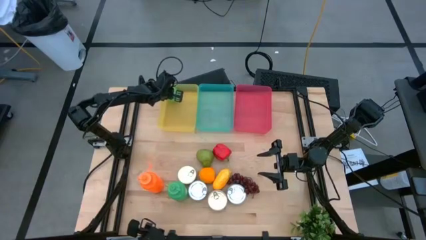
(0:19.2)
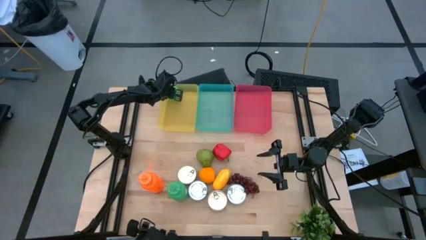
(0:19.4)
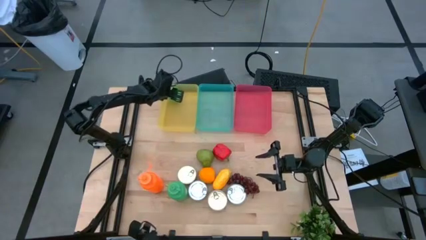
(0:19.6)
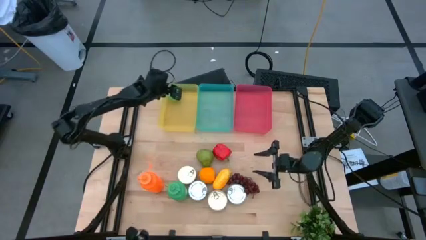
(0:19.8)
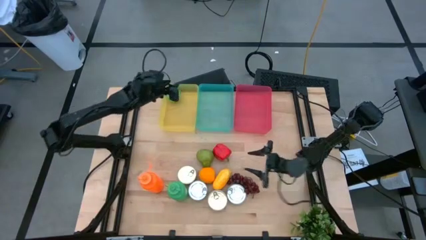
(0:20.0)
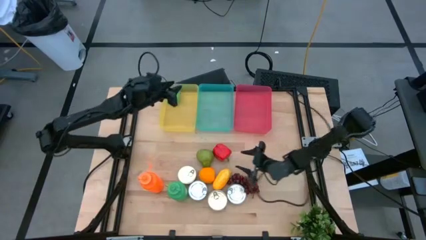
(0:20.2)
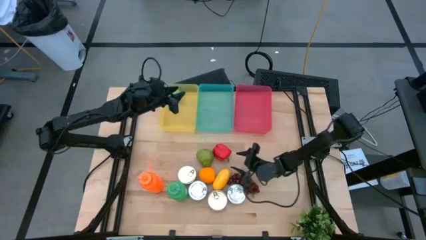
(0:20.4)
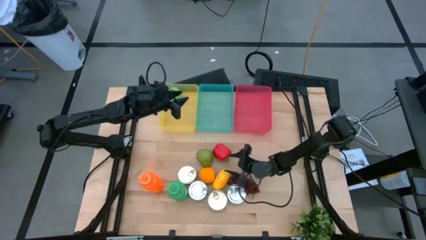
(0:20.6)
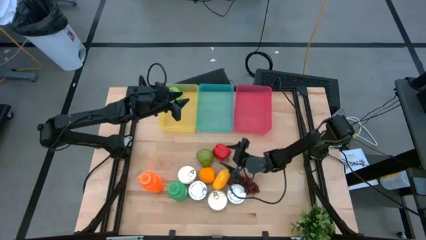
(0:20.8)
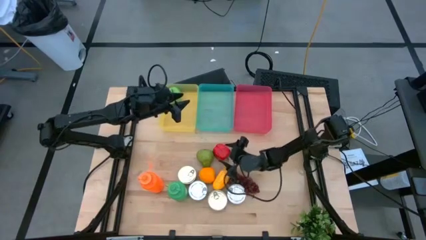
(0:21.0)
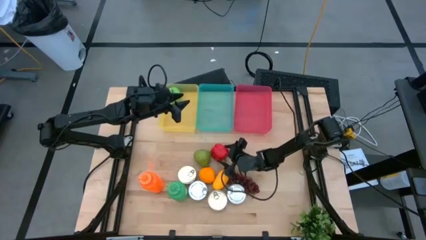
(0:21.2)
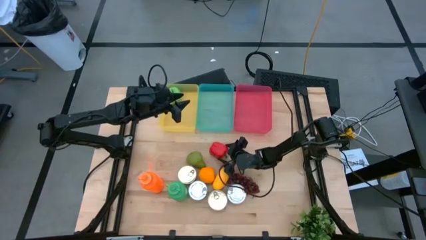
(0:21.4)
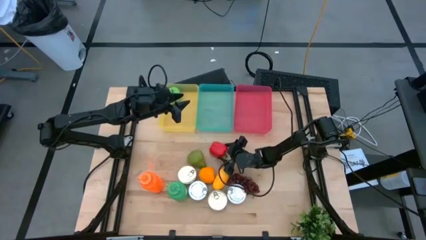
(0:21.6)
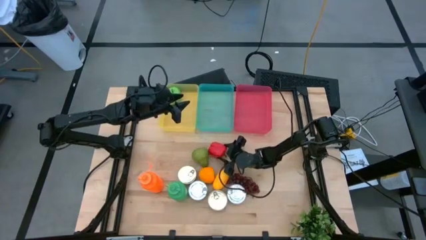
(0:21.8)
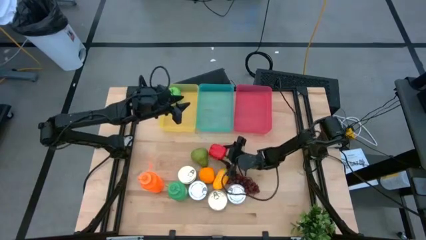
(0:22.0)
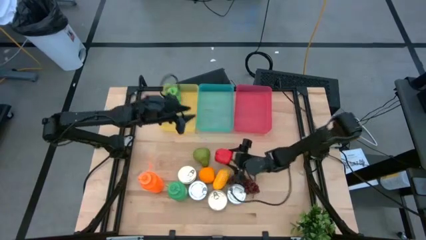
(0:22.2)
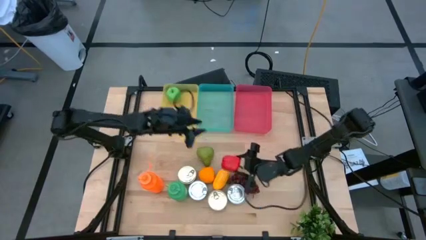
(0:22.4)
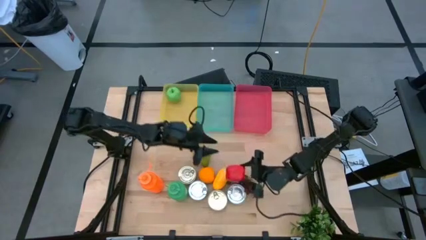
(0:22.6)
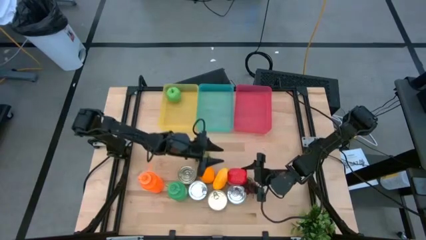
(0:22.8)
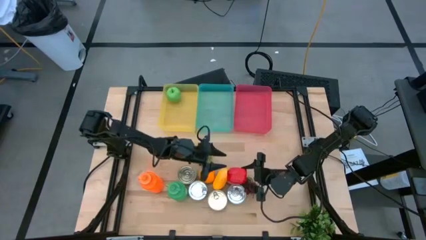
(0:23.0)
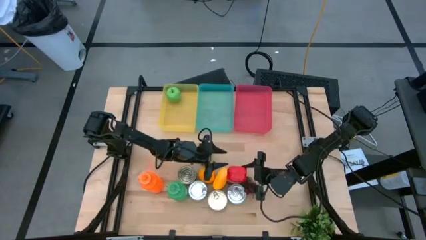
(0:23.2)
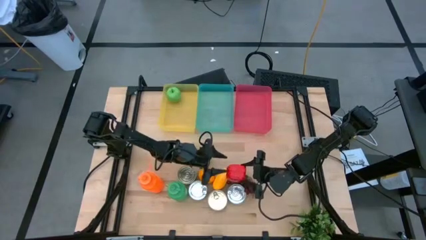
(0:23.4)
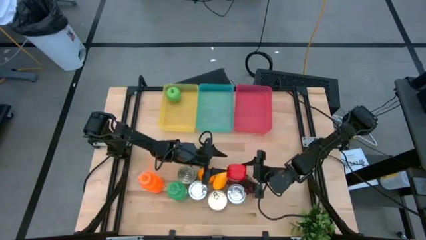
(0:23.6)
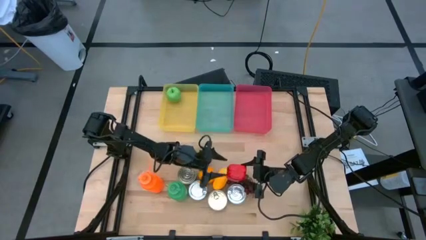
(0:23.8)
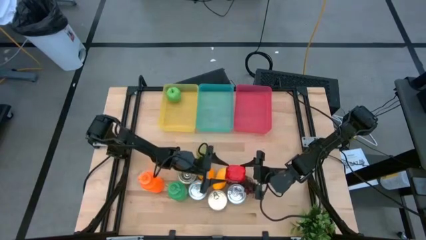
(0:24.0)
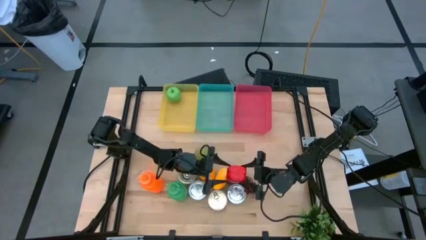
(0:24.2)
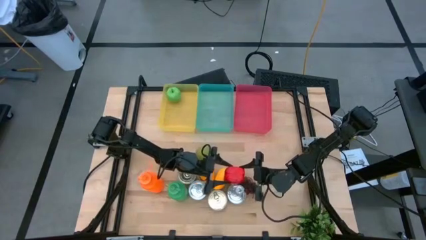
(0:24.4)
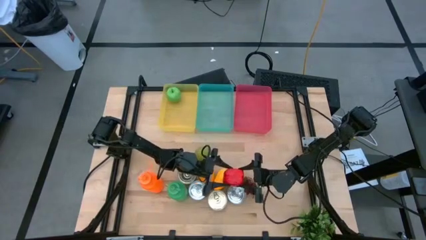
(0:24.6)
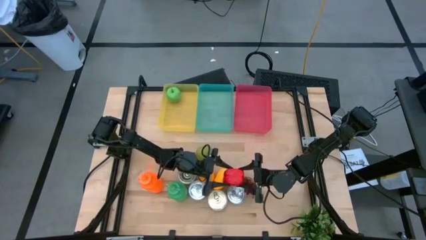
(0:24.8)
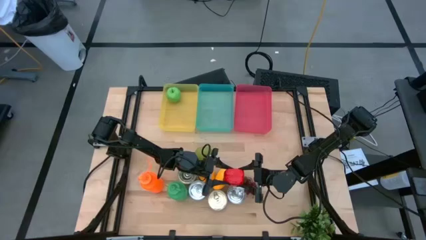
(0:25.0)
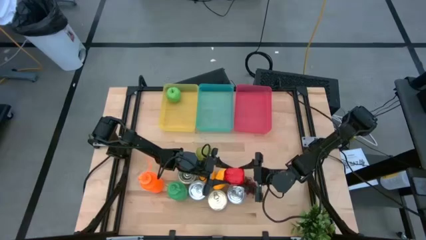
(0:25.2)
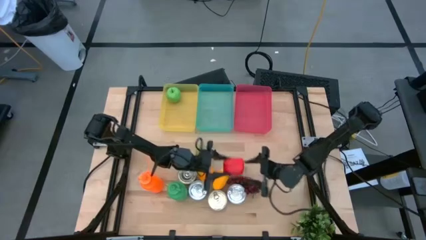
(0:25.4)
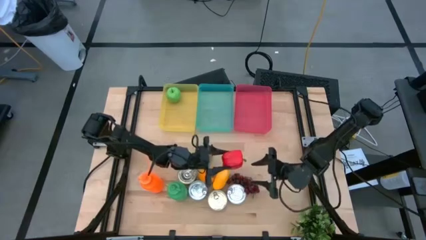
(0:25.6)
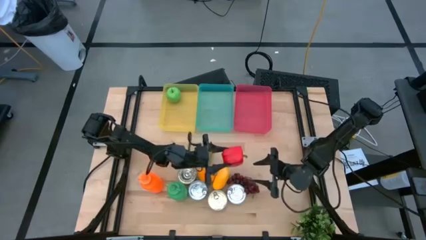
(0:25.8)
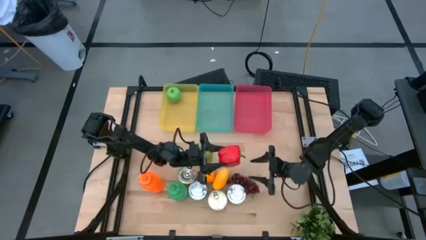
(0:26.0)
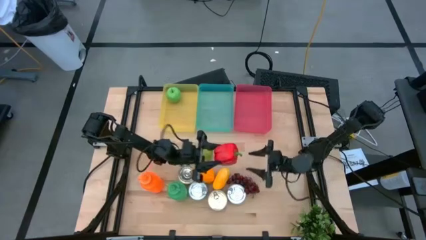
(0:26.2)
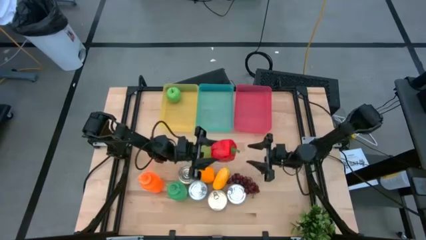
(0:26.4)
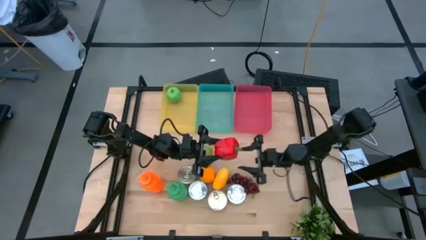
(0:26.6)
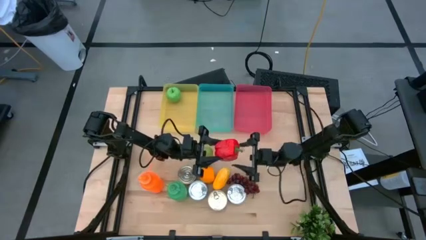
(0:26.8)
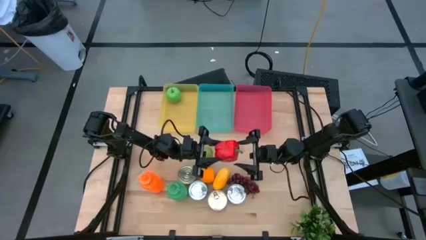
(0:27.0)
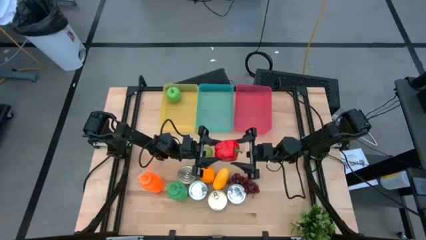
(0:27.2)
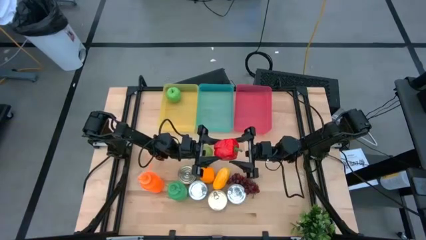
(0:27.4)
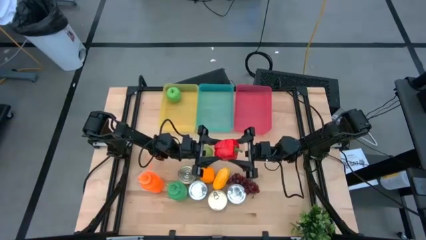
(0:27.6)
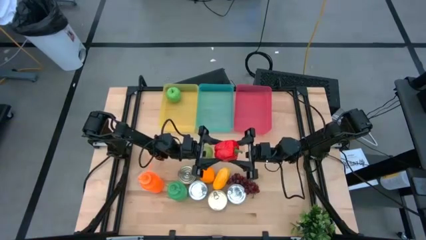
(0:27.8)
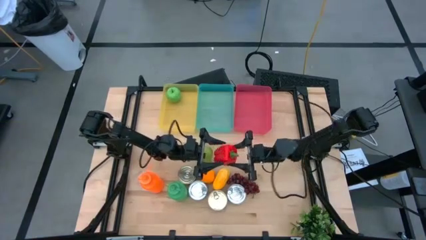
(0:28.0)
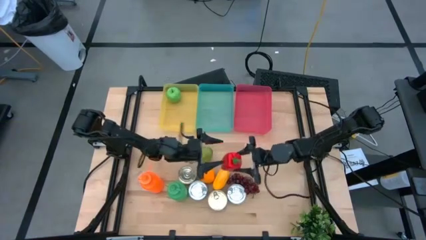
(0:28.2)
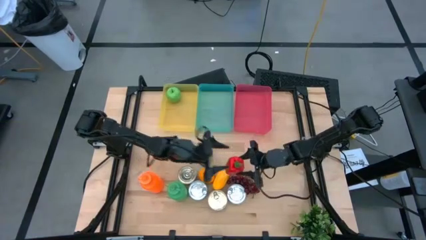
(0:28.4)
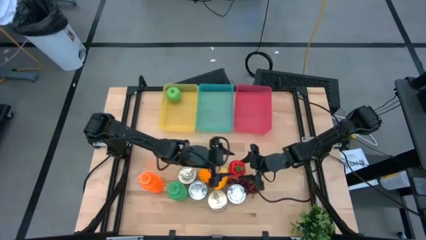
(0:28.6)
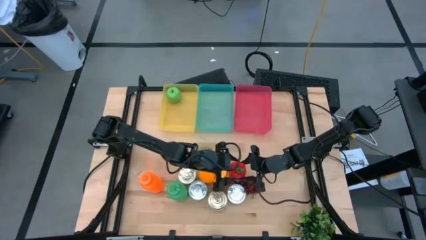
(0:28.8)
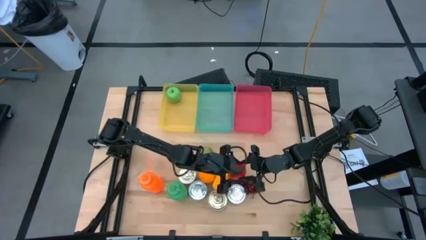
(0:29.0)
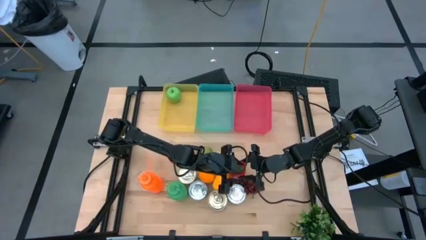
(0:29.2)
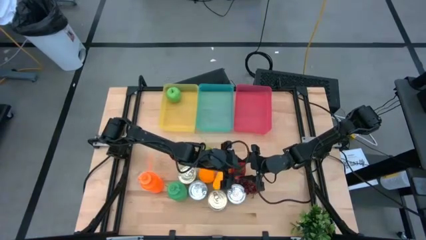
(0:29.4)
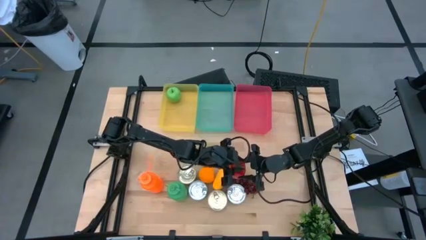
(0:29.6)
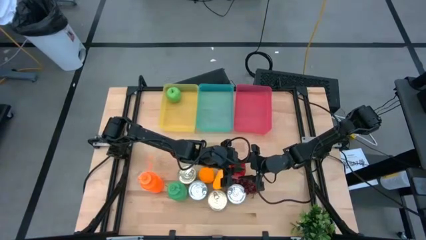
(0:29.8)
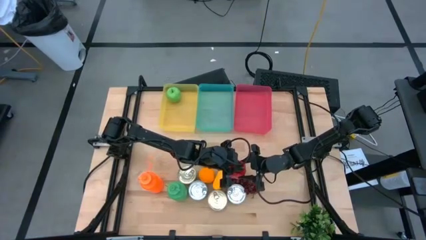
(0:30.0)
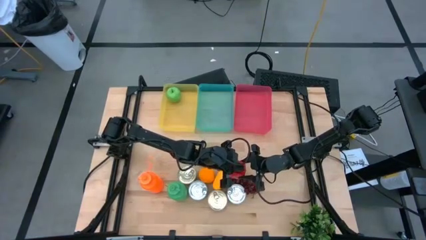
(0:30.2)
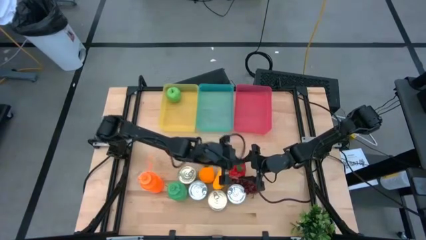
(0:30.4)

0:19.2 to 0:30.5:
Task: Pick & Place Food Item
Put the red bell pepper into the yellow bin

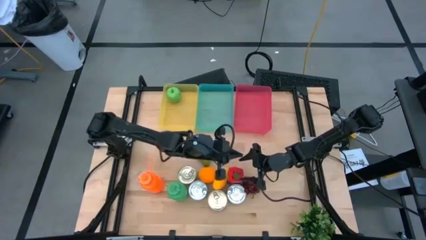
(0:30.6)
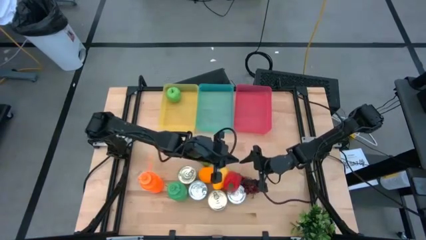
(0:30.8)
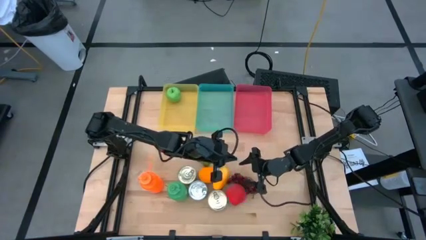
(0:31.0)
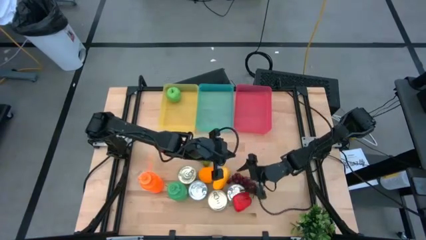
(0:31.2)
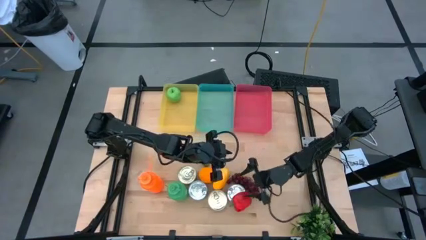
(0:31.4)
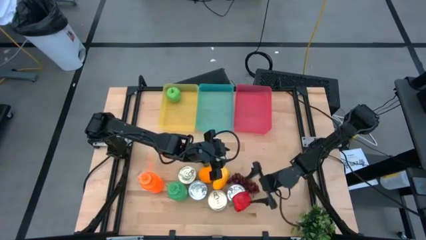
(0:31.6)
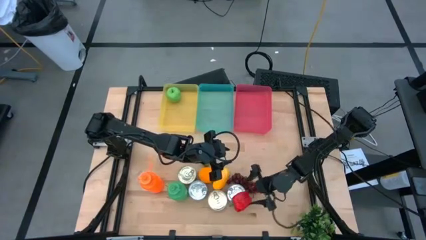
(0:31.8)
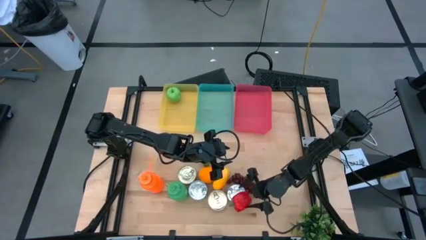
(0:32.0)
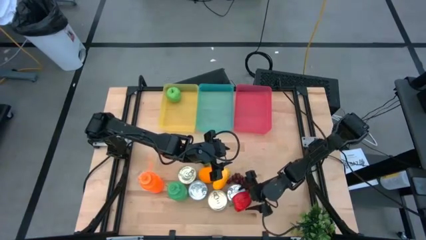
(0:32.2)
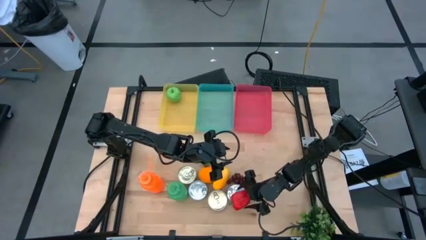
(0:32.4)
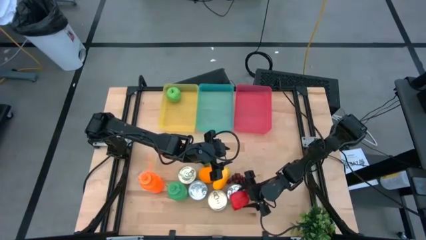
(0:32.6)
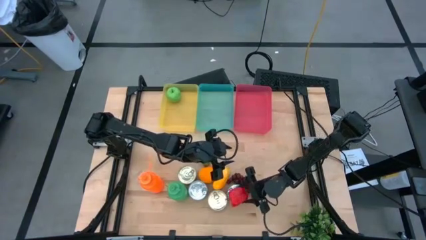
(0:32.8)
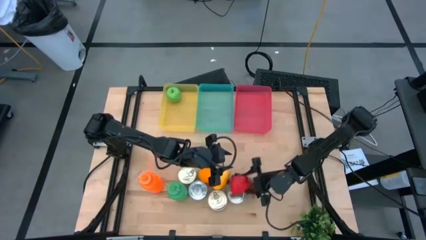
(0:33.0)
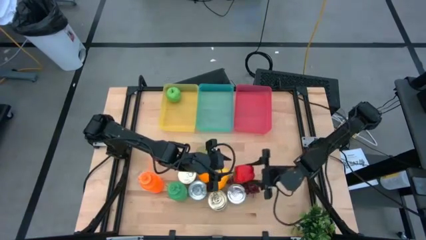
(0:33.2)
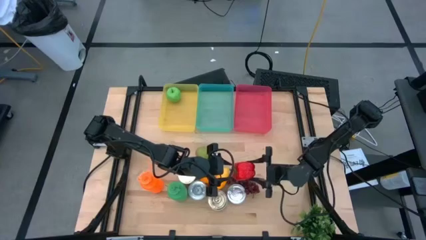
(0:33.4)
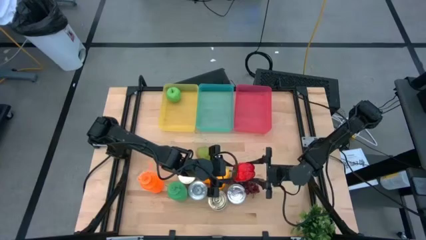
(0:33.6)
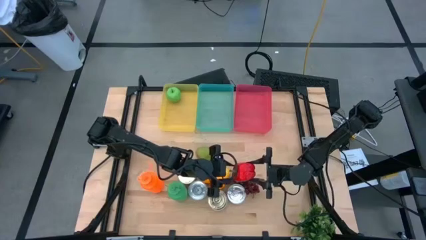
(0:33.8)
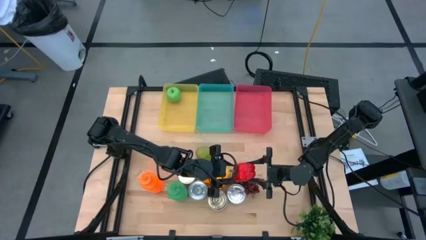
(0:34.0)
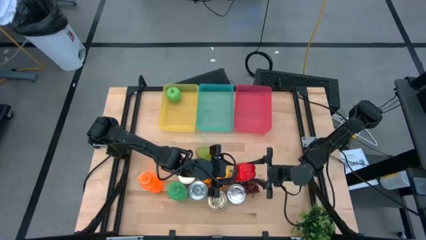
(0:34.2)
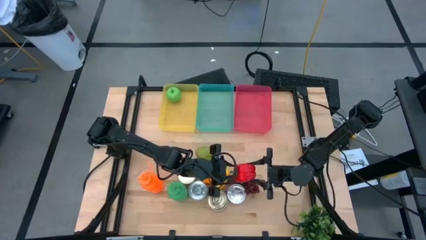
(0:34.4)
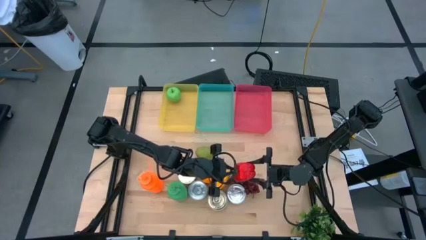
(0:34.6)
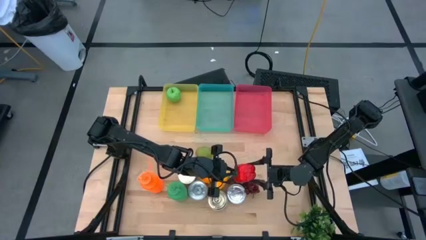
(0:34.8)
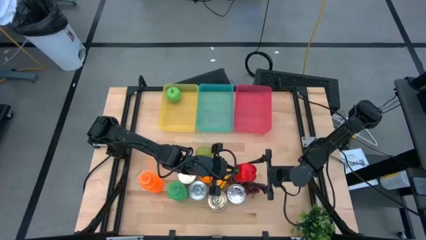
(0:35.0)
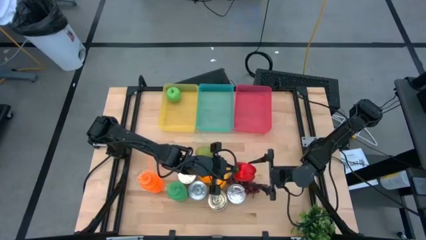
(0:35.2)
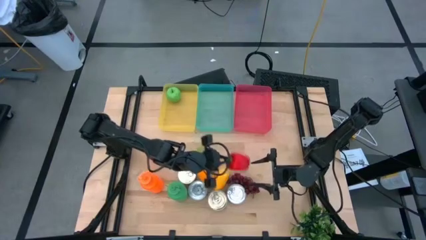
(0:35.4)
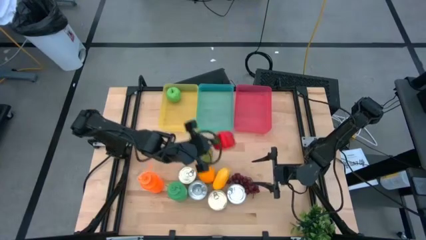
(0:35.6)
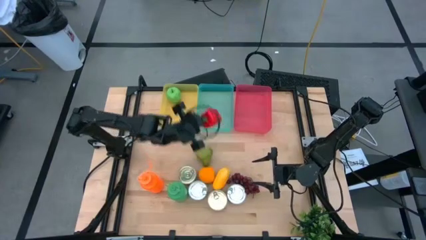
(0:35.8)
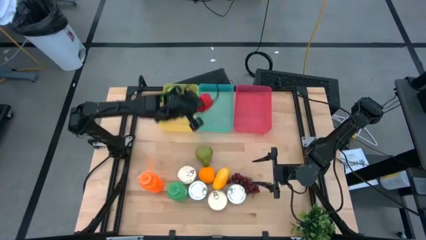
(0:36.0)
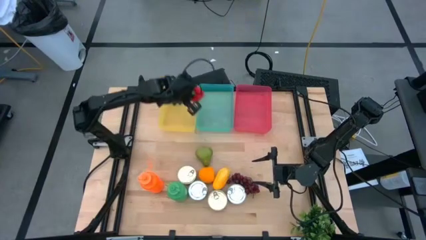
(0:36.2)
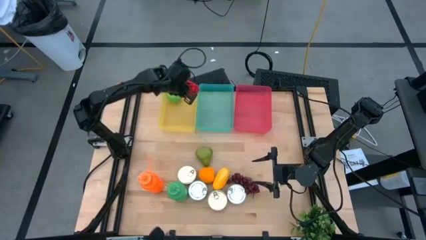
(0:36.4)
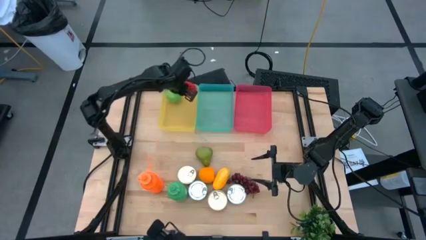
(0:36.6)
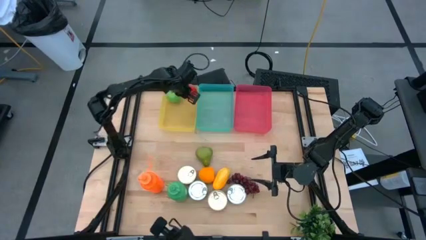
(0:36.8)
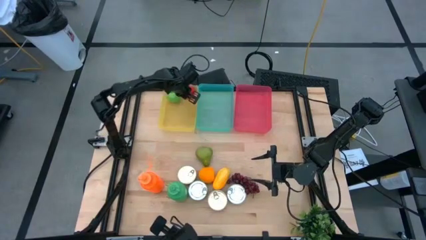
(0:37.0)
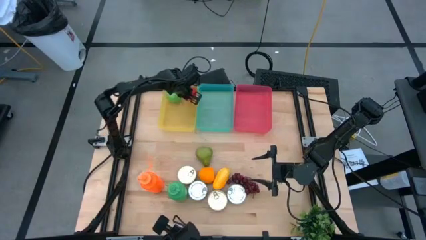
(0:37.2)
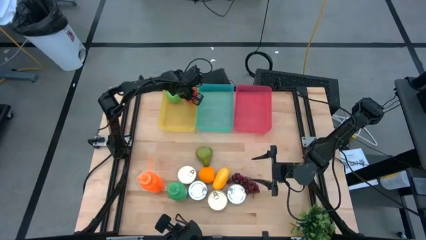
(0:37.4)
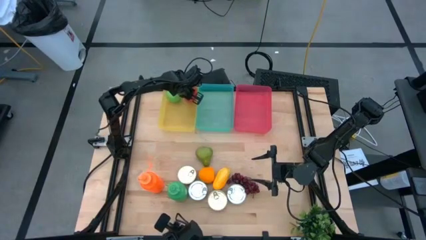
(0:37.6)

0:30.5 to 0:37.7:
Put the red bell pepper into the yellow bin
